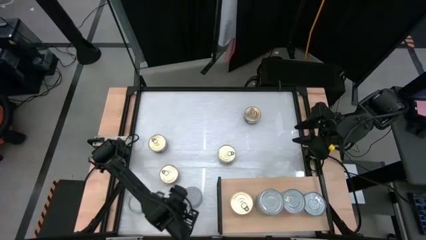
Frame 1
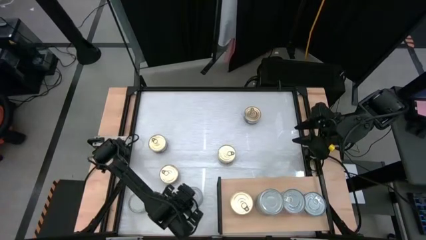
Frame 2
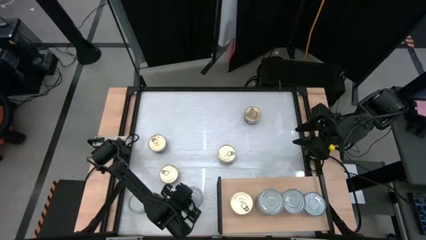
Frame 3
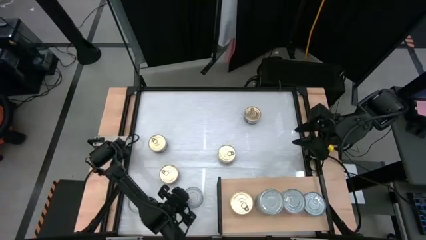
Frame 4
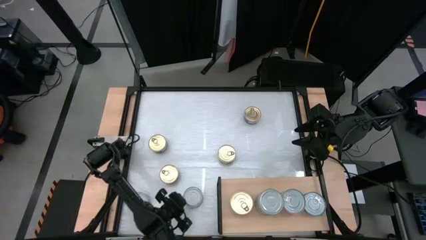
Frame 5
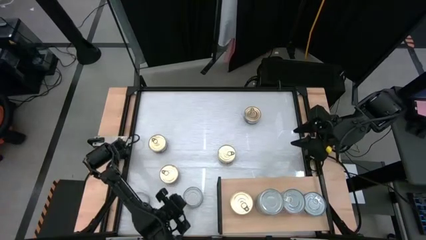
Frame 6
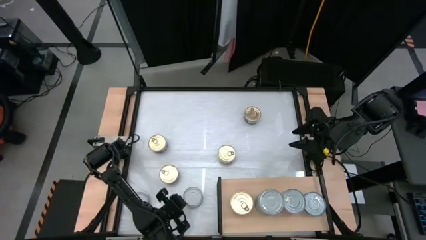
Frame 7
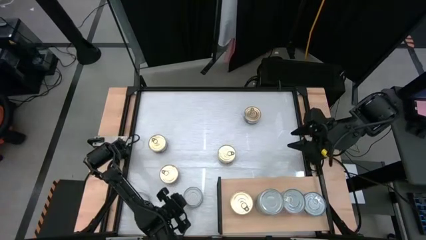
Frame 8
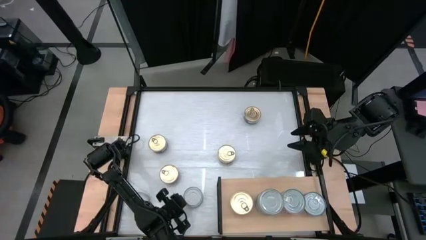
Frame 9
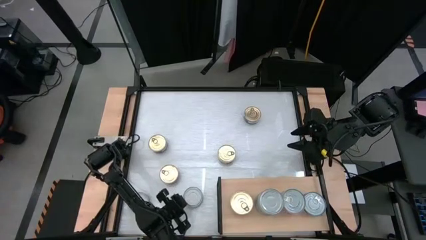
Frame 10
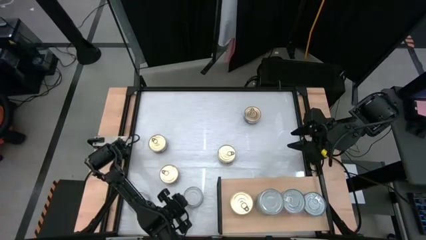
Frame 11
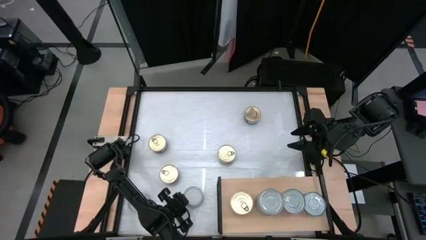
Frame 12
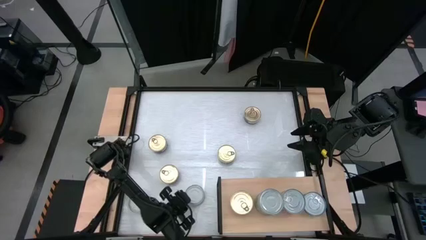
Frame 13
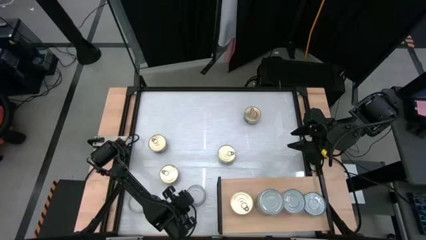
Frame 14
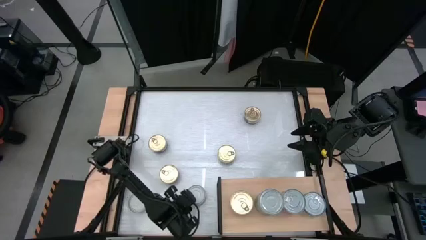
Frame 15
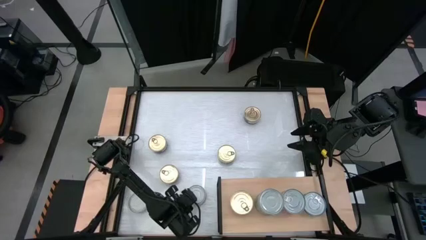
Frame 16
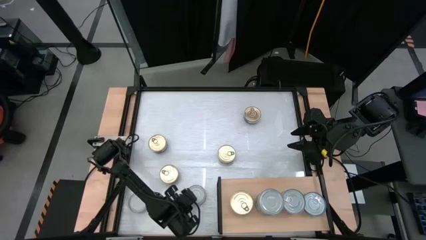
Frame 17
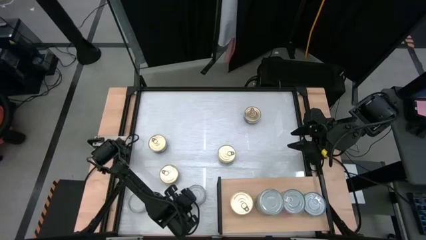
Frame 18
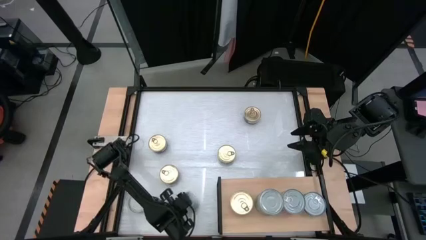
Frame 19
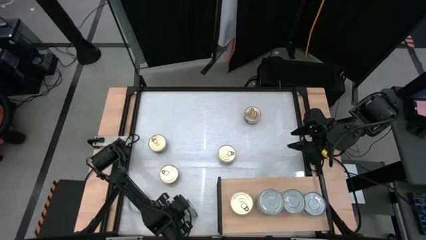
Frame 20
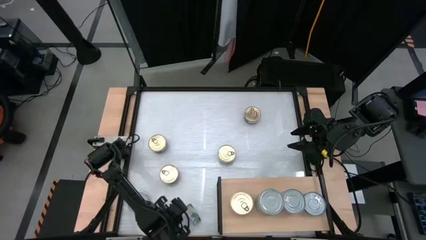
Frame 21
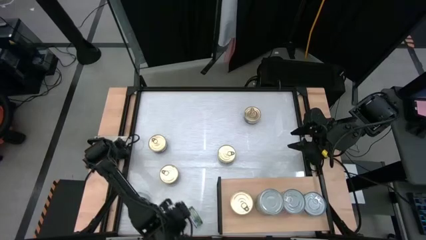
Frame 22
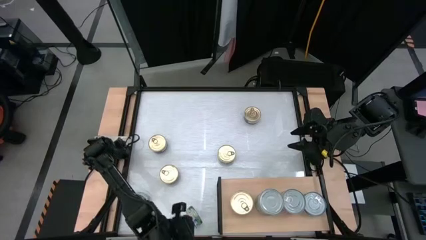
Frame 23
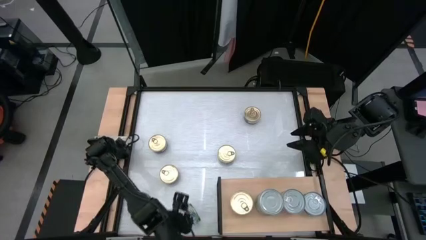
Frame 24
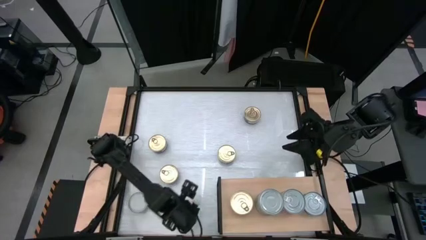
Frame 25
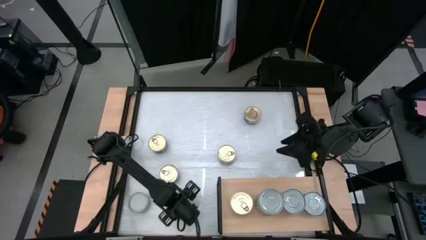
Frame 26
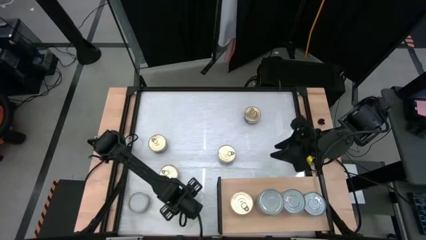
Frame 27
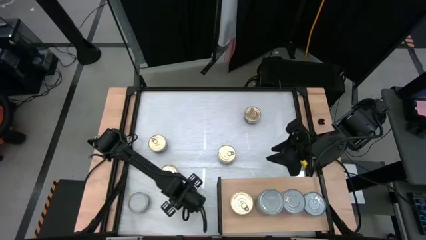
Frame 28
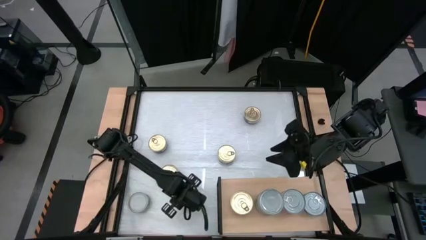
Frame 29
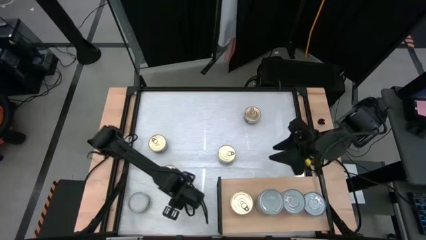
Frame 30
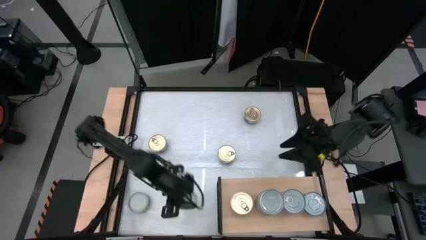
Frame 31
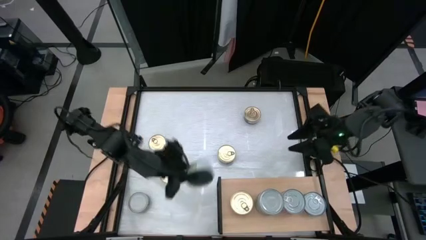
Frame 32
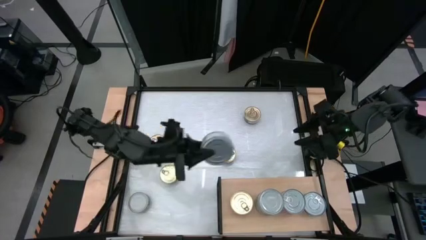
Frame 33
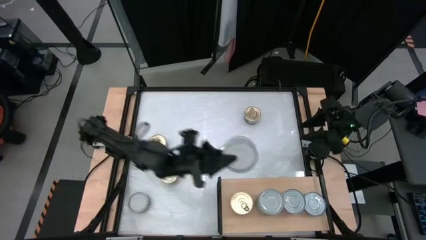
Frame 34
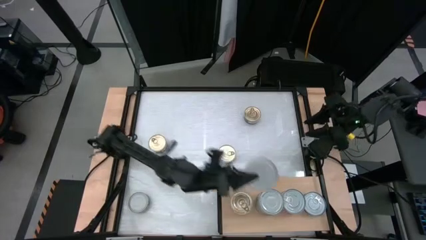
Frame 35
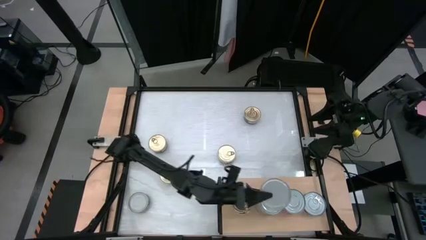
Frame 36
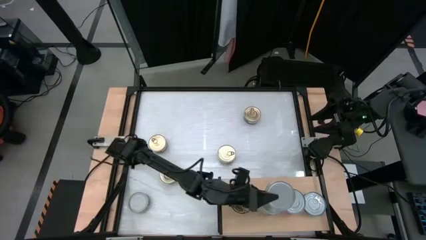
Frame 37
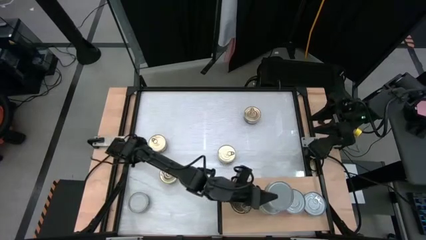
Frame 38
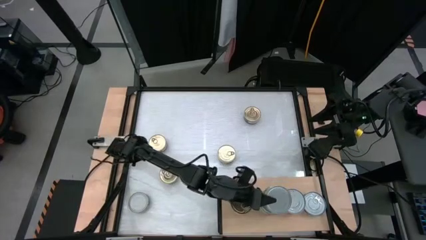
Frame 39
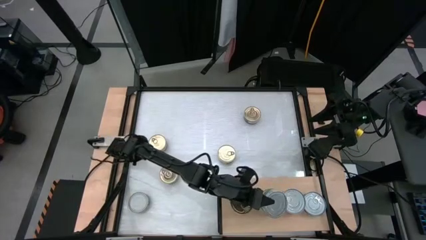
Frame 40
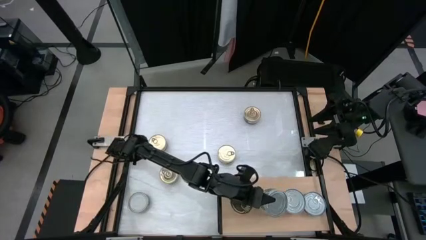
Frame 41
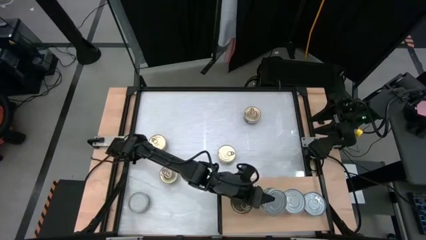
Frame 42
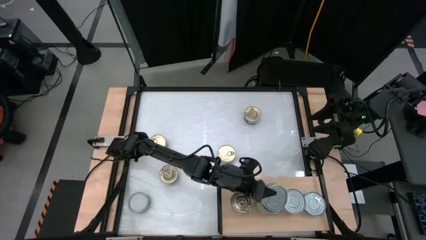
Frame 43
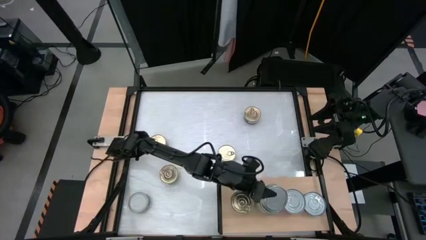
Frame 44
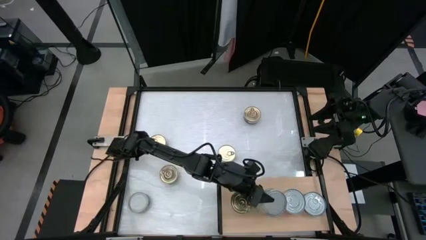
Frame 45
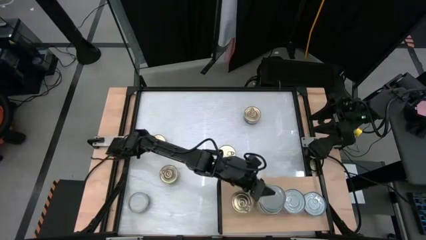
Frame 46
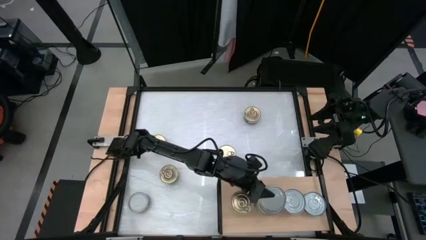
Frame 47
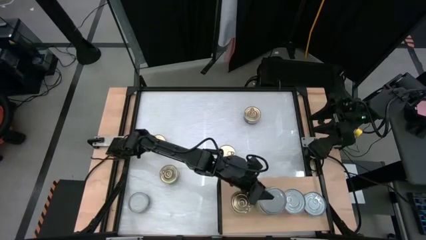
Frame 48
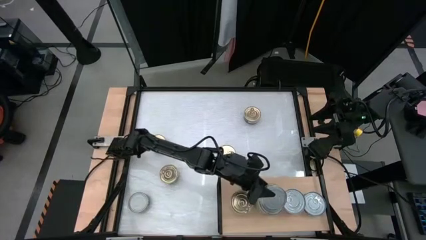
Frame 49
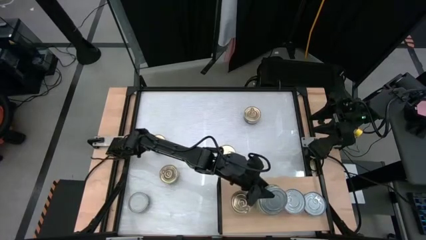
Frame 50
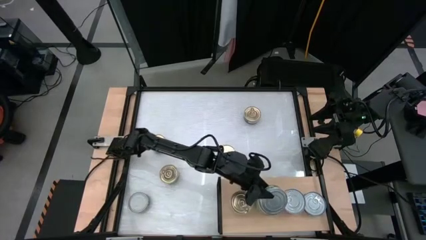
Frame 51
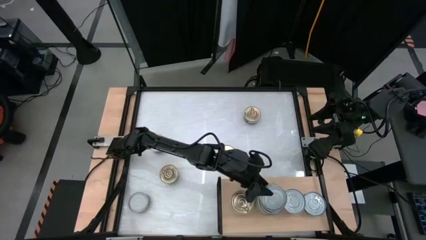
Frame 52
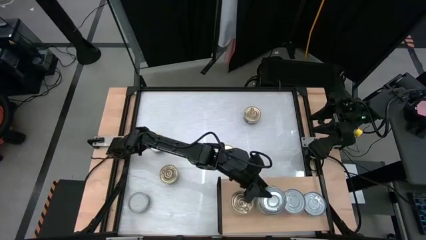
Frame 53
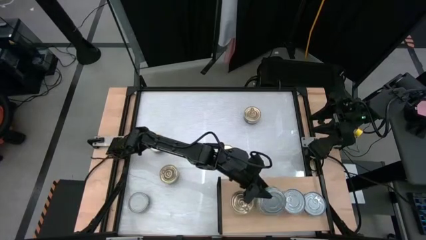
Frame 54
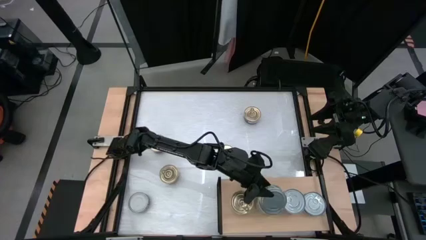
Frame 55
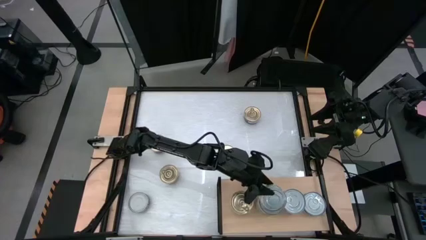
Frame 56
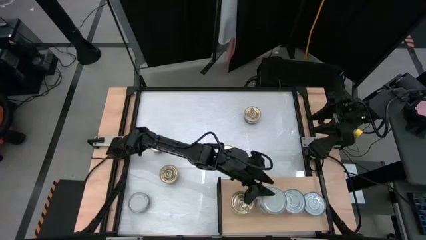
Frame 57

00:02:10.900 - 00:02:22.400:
Task: Stack canned seafood by type on shelf
Stack the green tuna can on top of the other green tuna can on the shelf

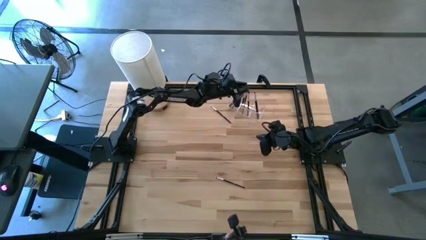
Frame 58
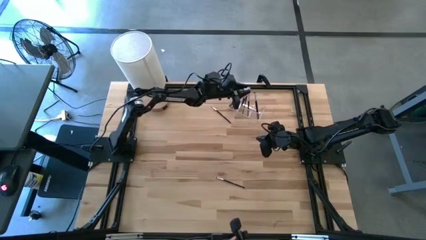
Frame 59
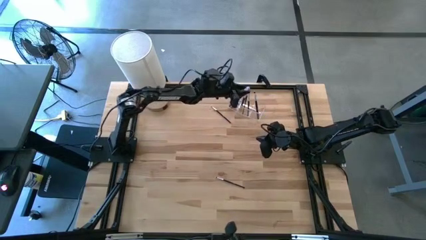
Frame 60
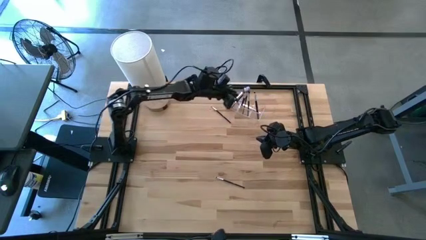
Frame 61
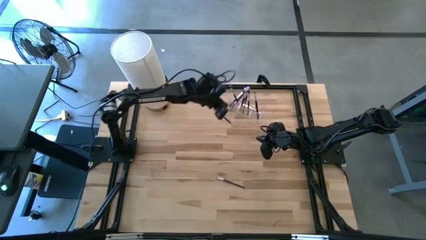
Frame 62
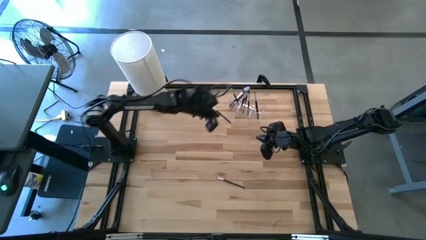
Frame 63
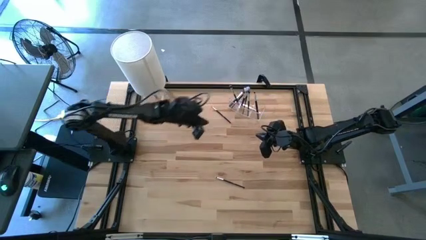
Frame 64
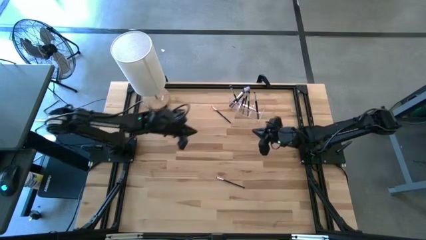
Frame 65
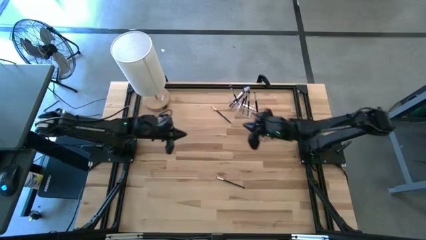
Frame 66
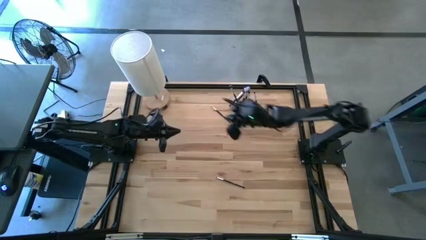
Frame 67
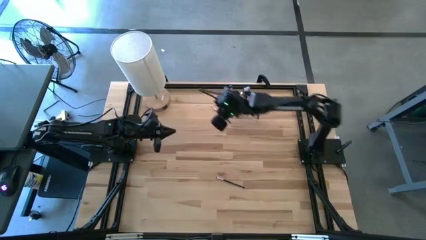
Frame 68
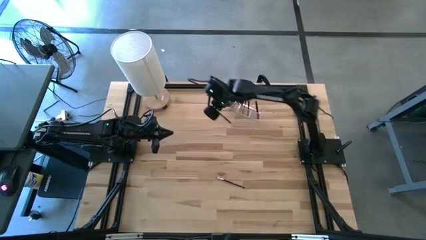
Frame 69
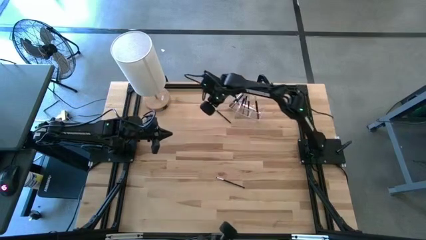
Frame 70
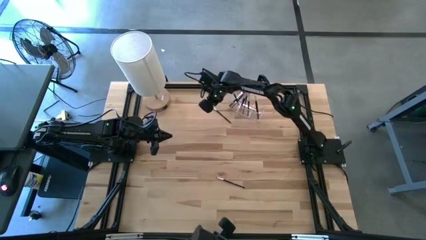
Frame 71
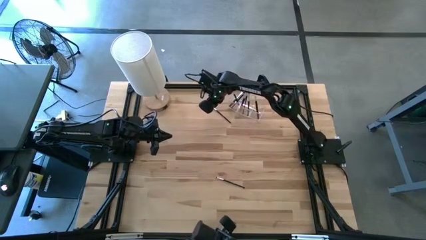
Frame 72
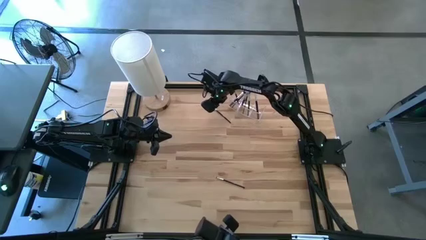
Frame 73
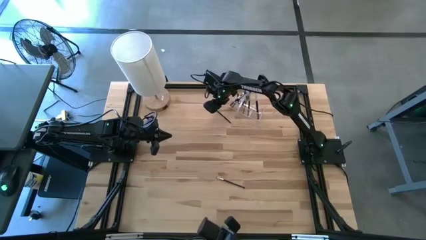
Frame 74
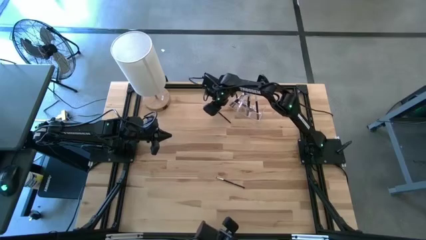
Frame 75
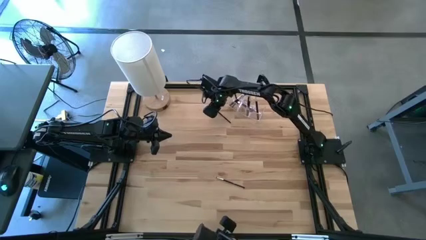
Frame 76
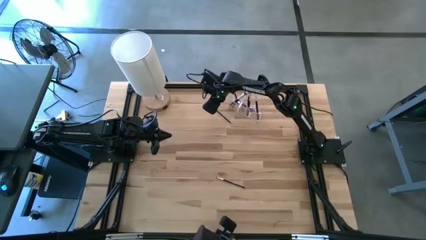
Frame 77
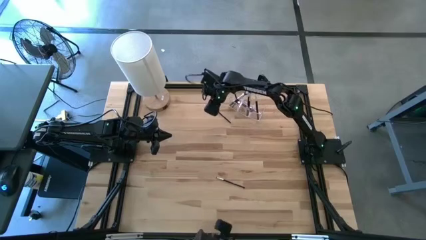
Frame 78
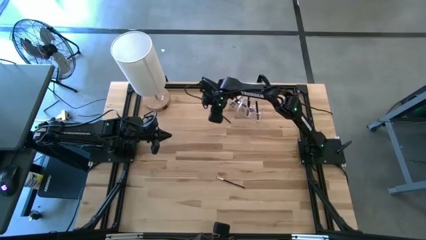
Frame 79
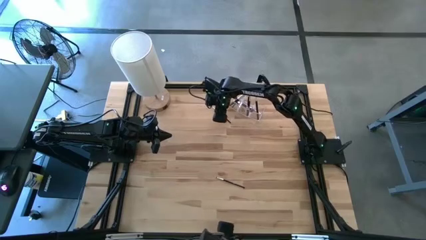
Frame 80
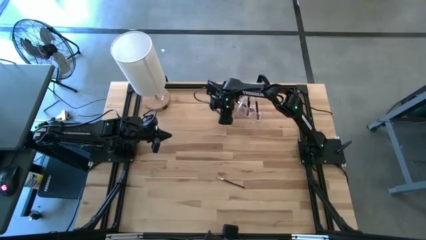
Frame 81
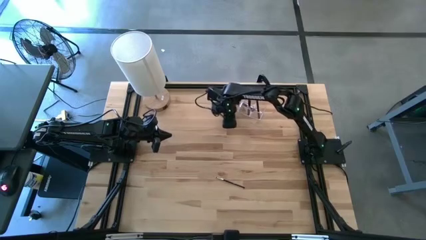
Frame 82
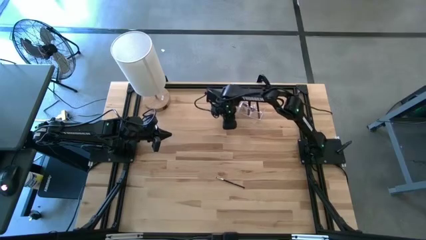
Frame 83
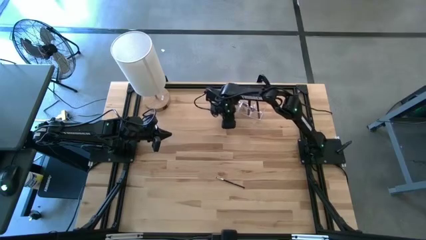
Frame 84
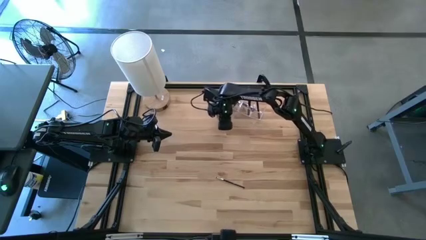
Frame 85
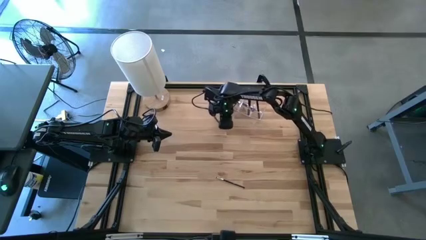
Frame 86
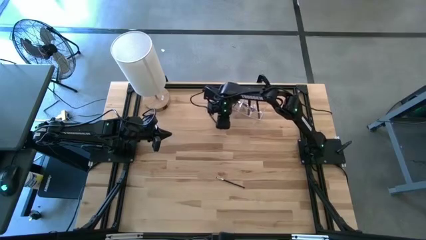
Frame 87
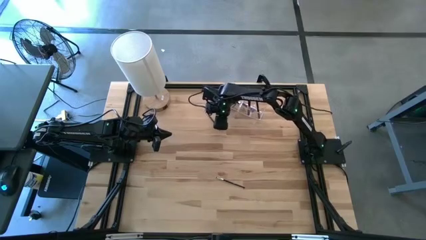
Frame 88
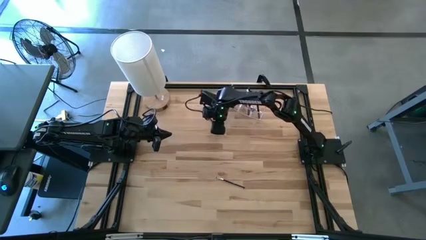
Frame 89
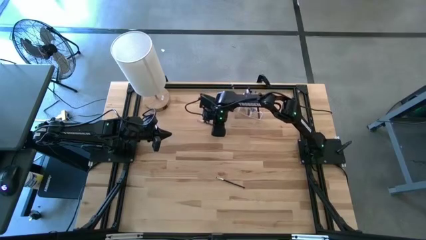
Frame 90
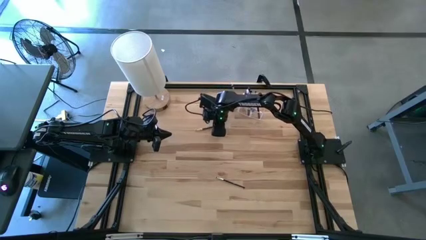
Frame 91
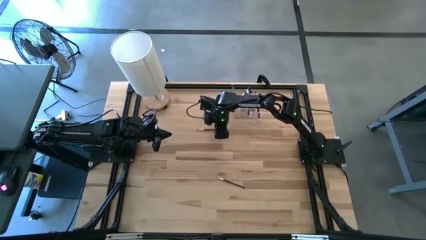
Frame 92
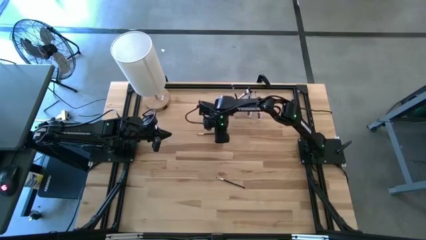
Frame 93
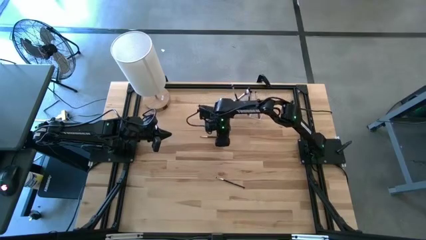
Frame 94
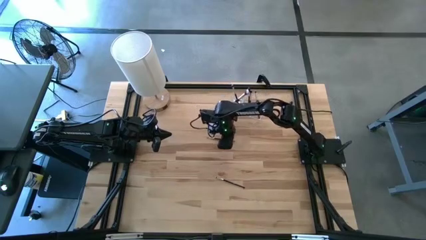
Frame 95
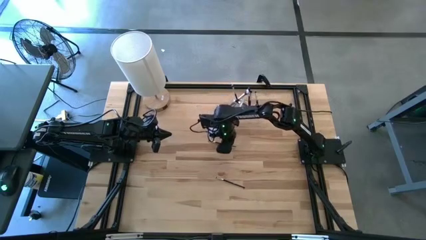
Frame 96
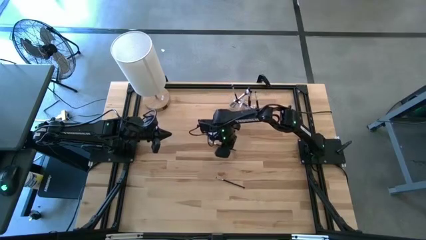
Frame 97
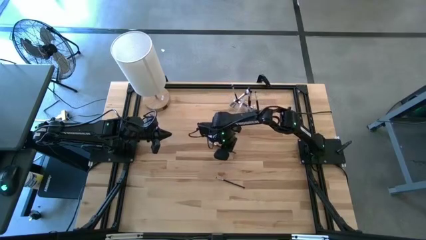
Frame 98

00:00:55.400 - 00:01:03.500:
Task: Pick & Place Makeup Brushes
Put the black makeup brush into the transparent organizer
